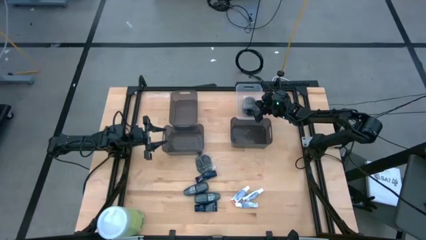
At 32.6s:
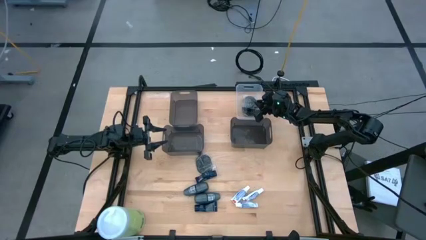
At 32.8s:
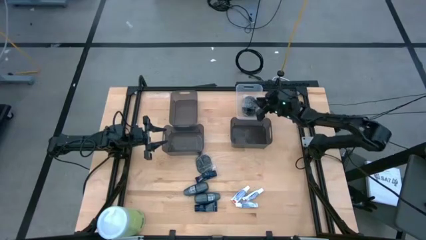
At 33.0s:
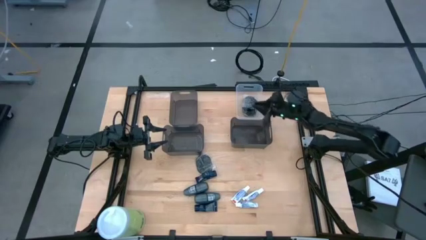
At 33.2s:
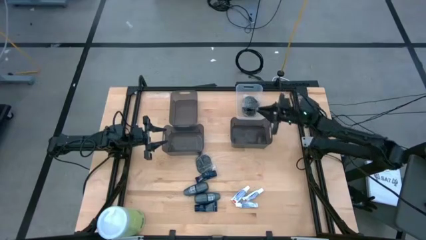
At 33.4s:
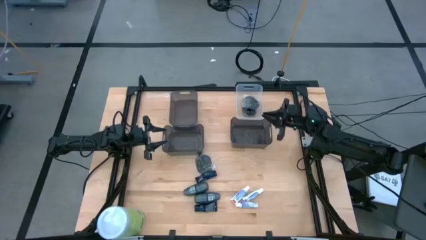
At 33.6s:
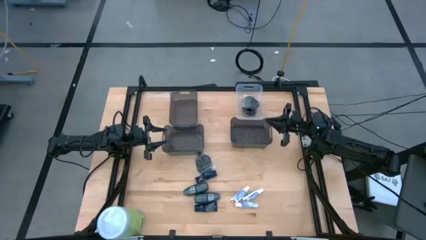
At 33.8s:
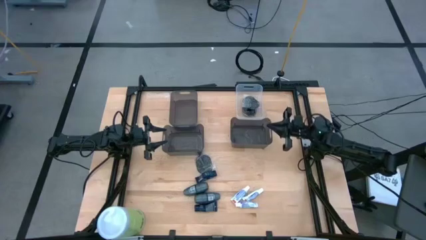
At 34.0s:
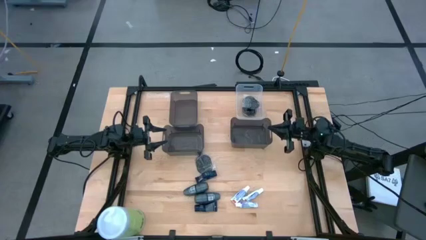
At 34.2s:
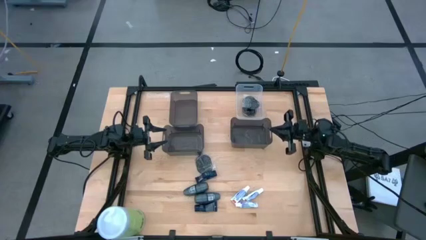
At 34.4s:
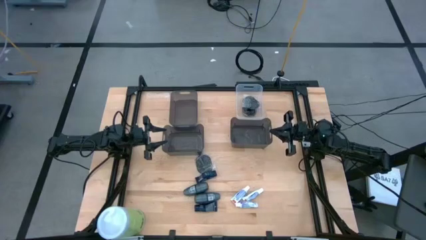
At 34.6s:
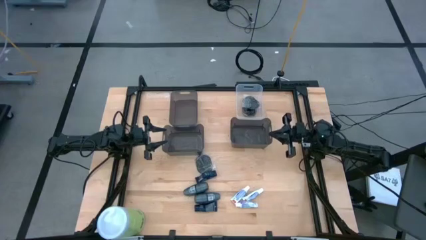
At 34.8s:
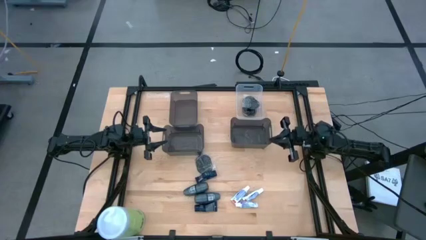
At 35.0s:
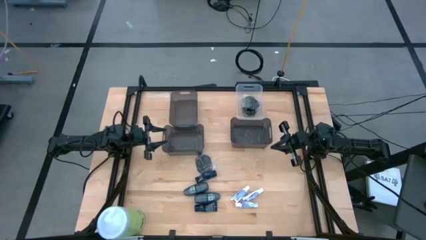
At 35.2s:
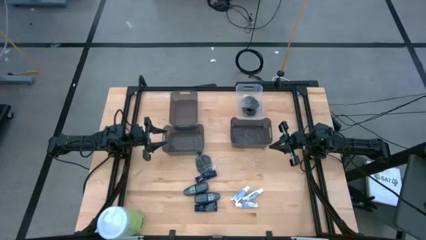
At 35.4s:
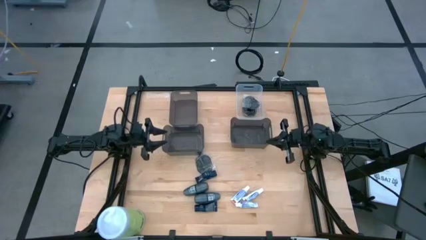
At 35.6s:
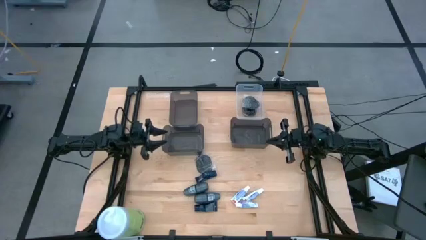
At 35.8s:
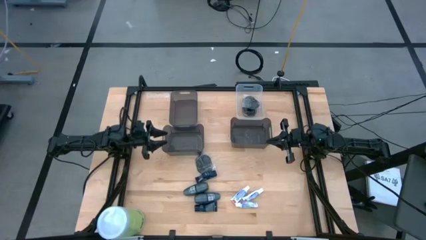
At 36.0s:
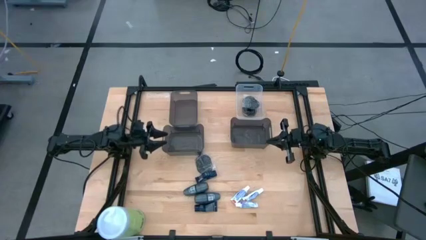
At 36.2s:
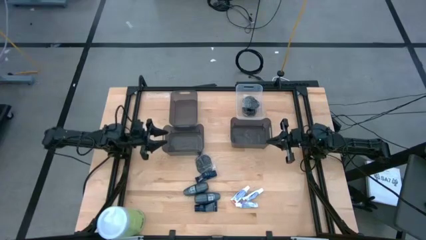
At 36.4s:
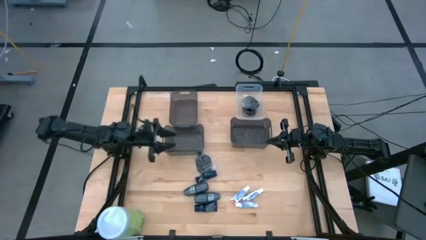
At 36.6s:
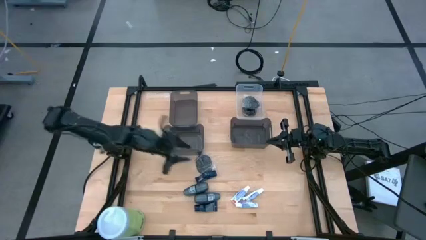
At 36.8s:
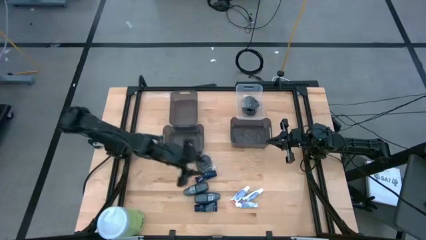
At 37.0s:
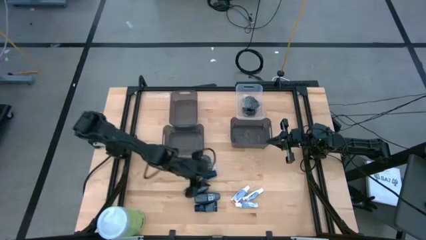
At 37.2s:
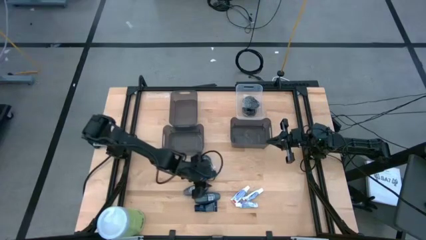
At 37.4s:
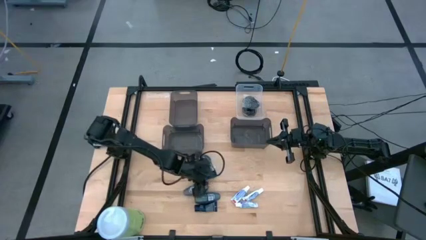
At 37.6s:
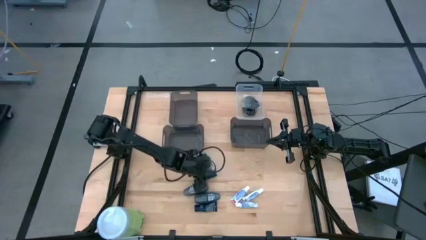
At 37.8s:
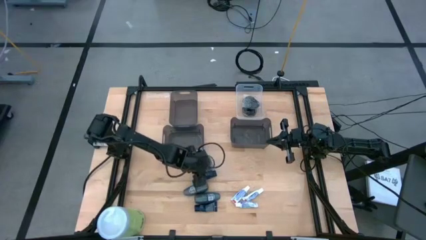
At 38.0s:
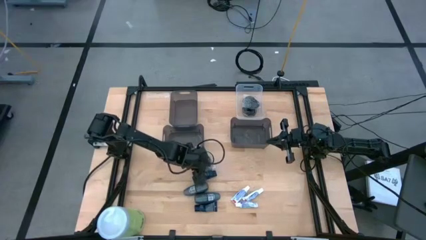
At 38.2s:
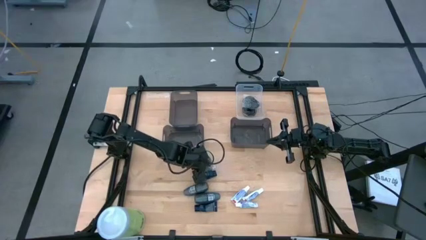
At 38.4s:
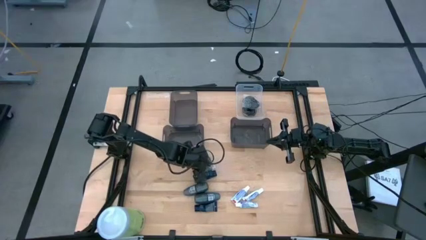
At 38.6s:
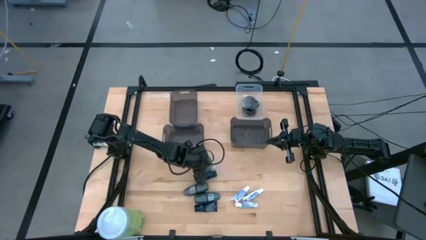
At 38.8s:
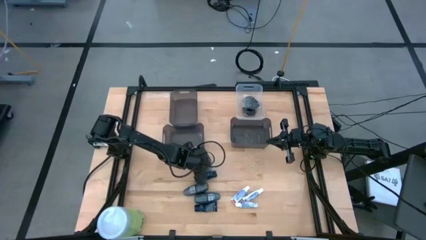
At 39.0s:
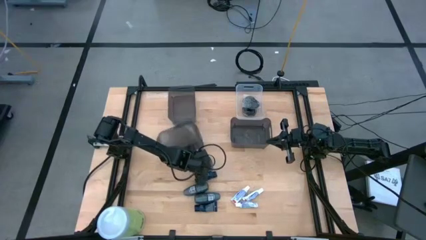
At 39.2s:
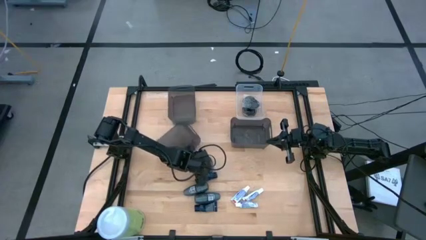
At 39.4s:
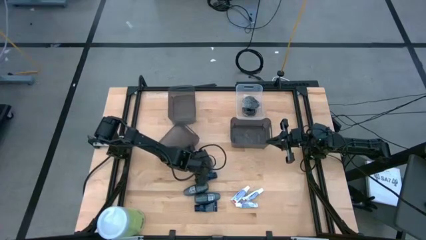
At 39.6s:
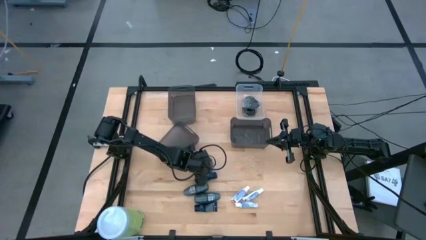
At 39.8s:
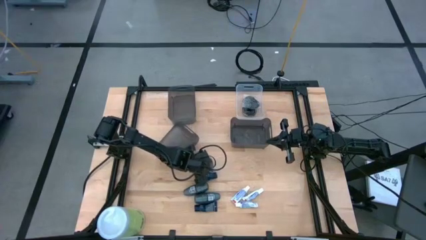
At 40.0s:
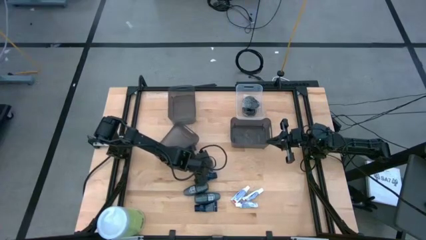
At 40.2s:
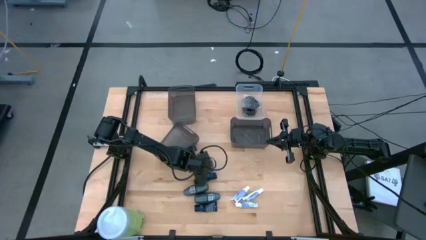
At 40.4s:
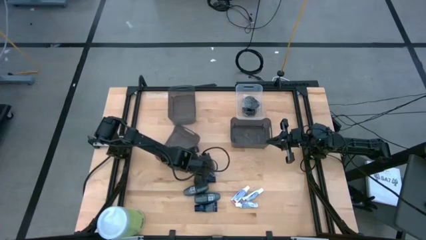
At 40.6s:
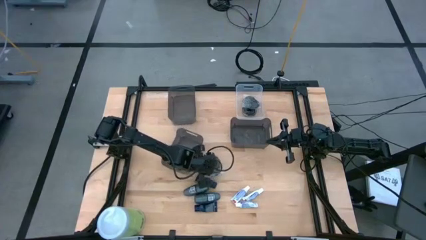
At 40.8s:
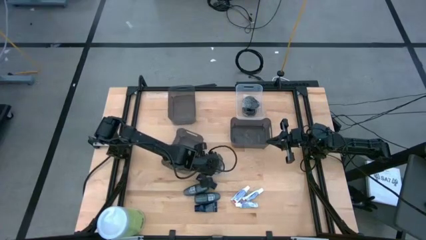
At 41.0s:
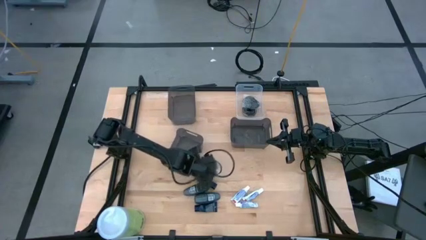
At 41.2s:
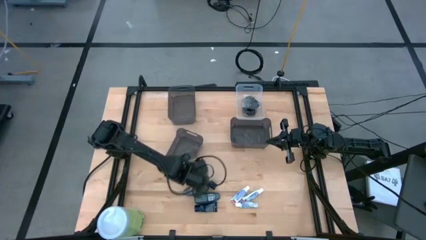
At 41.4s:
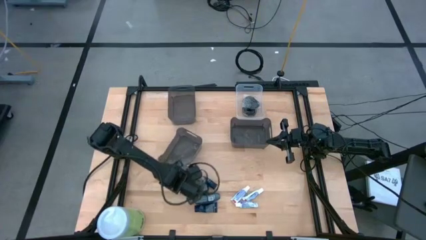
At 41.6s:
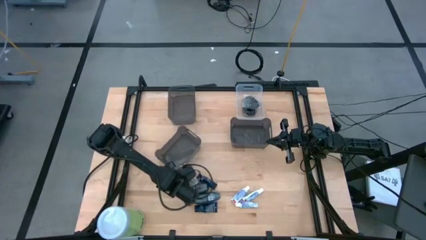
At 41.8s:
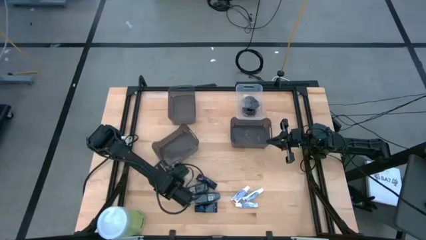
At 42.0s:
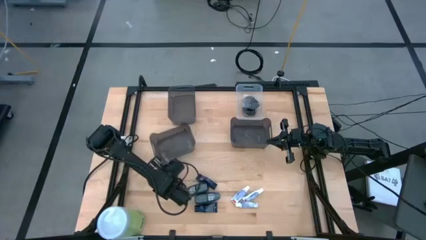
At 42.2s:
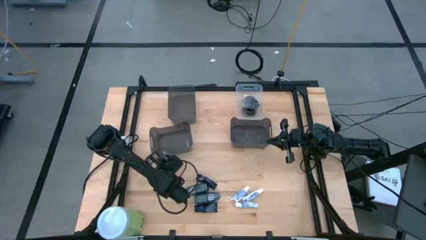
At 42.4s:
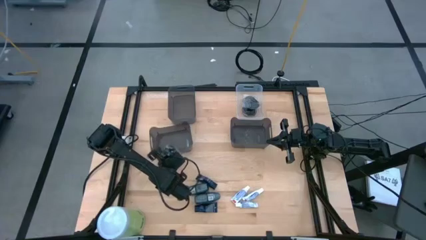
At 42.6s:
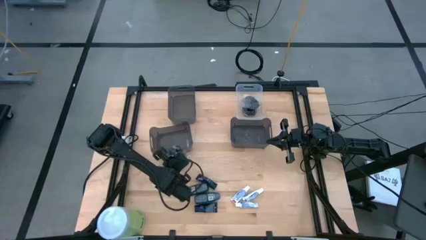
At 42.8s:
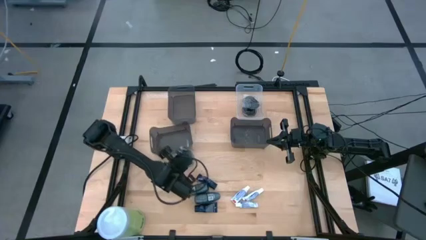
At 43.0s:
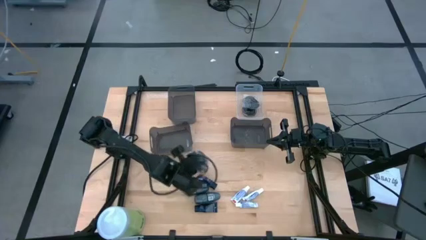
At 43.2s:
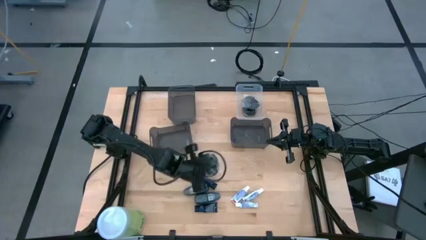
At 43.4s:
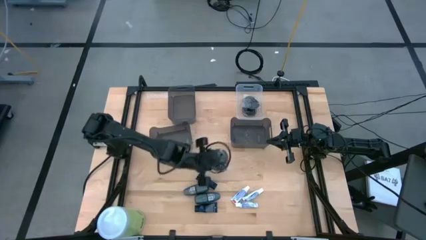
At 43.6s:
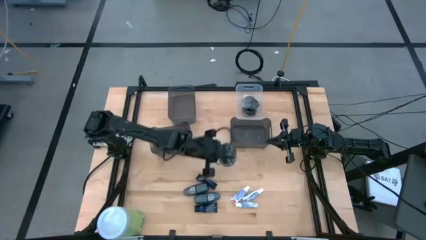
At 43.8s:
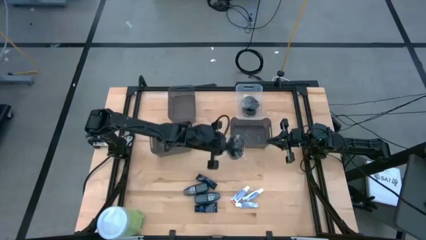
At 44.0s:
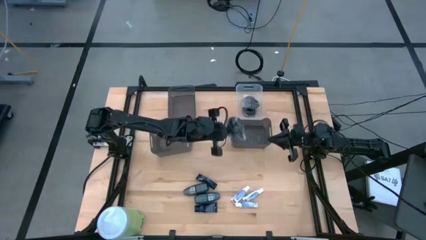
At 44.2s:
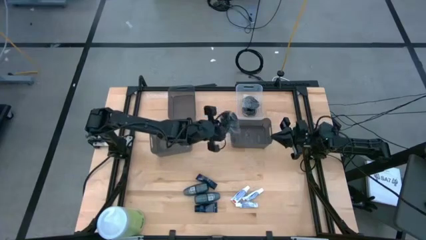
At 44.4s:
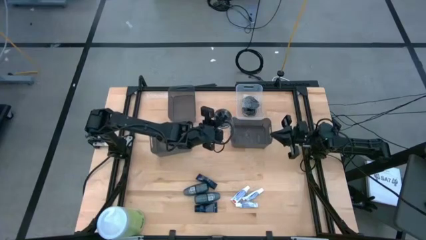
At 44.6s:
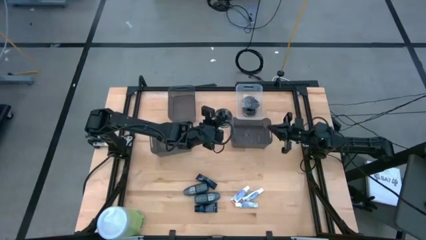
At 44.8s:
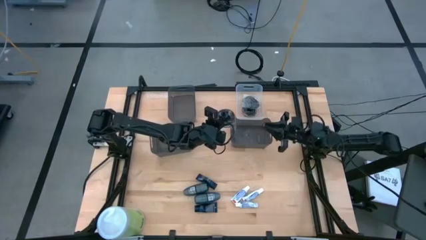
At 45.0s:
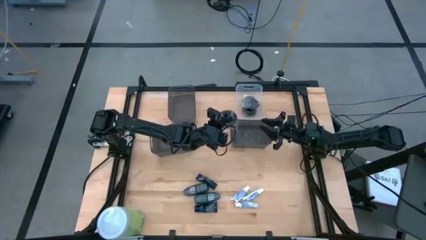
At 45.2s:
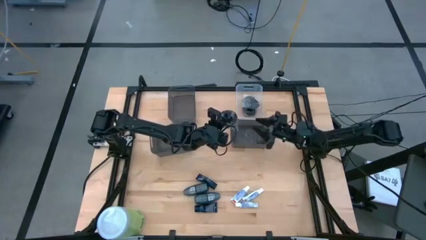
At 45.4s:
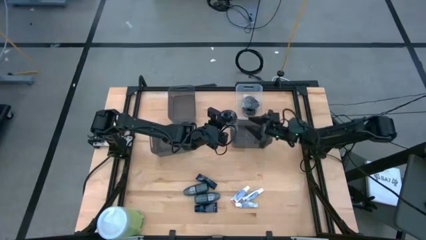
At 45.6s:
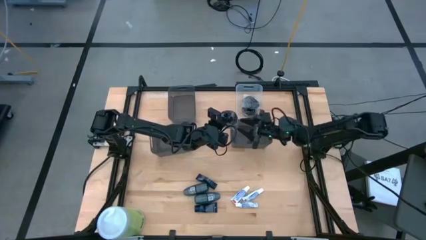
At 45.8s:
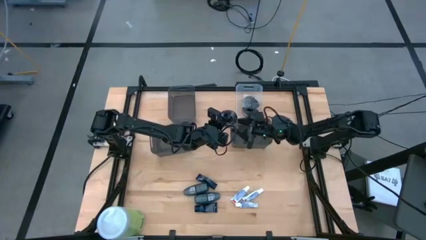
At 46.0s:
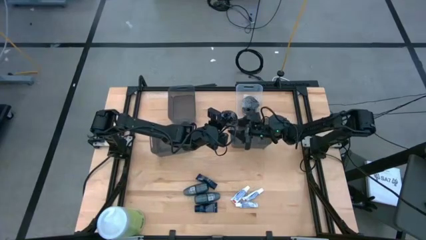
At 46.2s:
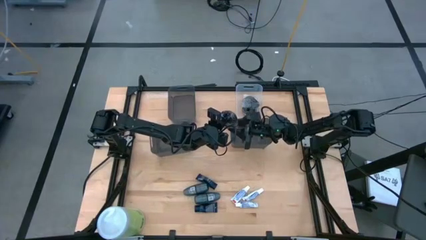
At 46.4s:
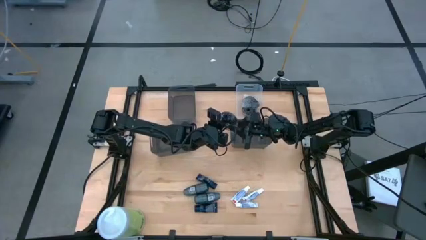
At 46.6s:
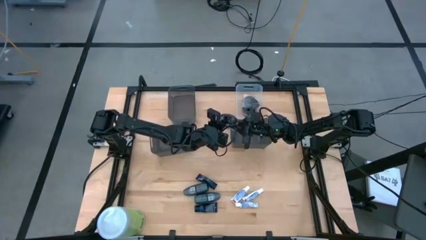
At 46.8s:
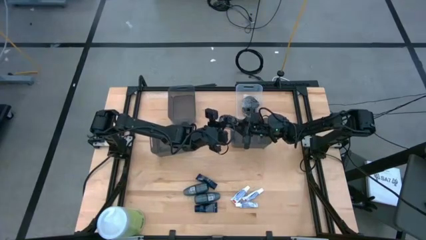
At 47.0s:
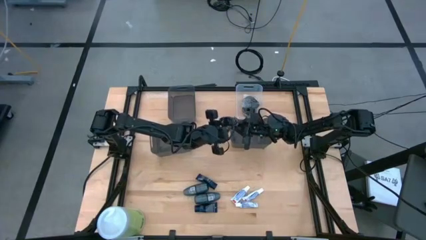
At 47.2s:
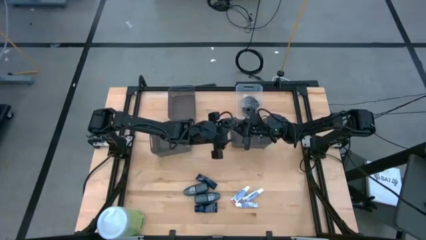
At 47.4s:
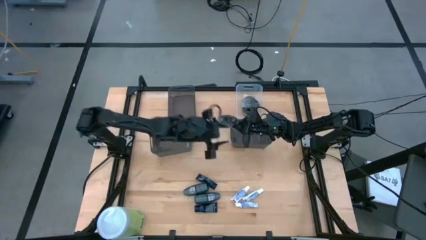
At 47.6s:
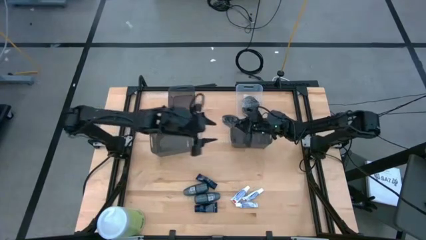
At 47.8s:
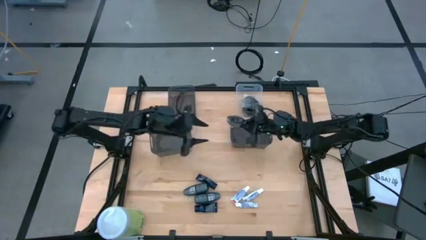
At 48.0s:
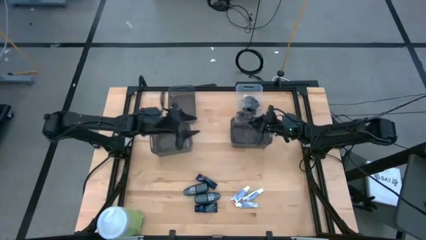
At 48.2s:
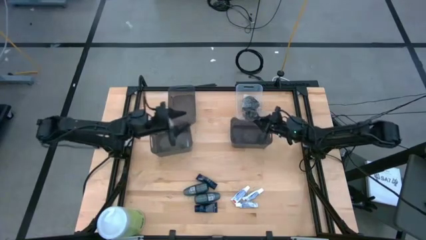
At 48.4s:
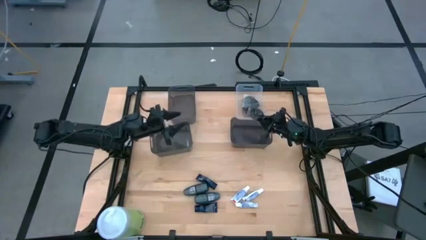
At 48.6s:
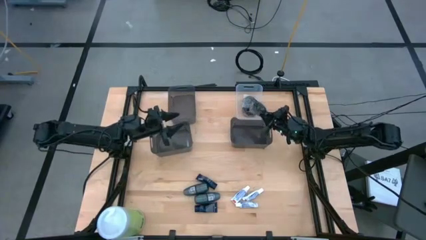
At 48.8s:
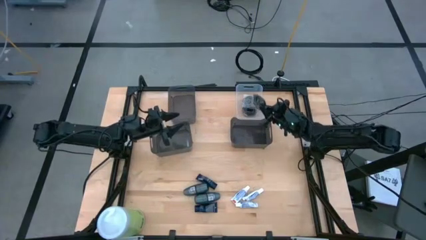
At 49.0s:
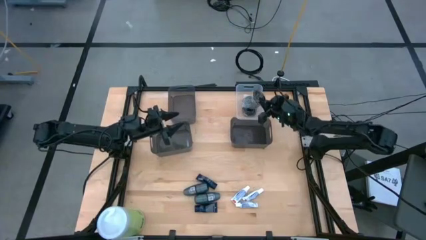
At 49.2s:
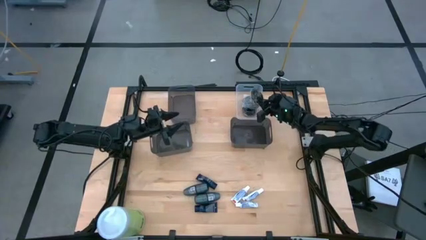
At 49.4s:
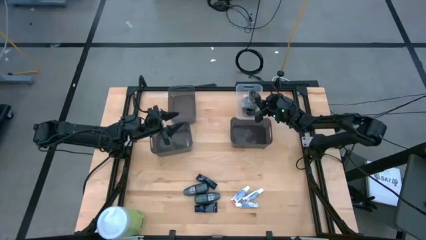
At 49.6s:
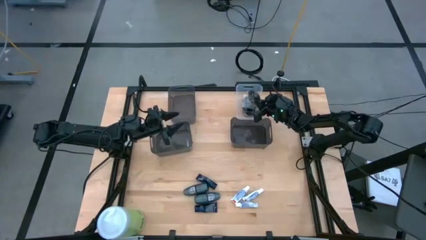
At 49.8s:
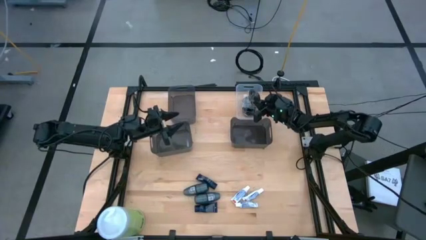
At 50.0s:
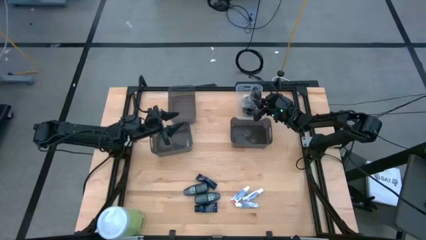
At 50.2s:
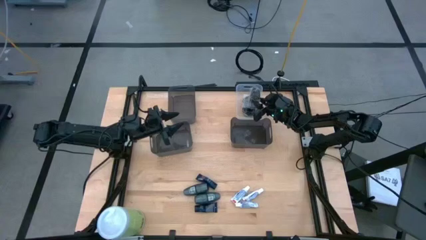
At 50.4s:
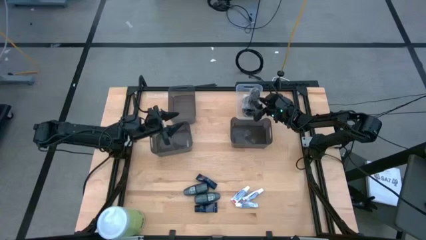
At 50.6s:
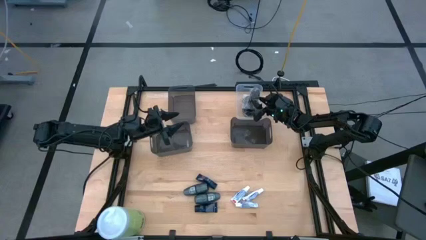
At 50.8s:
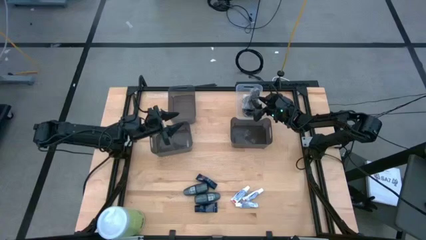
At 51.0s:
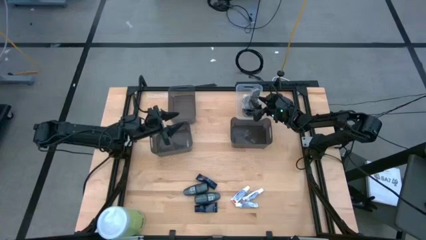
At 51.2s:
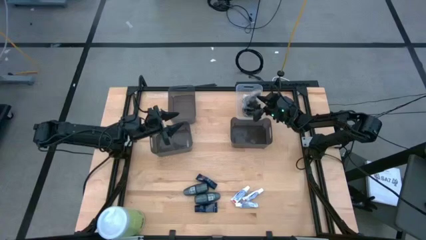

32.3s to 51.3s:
Task: Pick & Place Travel size toiletries
Put the black hairbrush into the transparent bin
